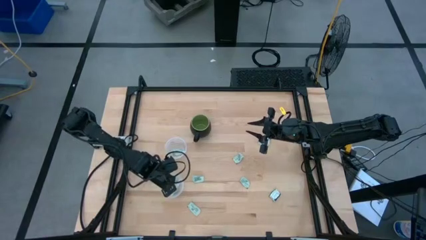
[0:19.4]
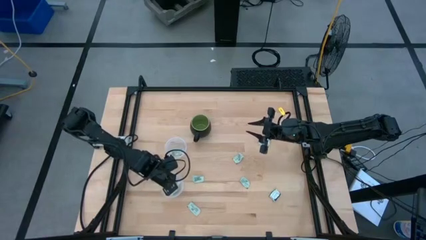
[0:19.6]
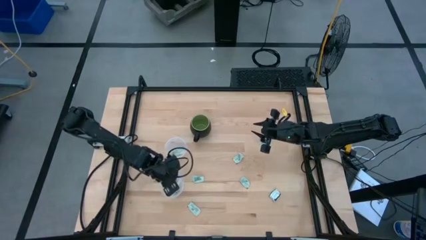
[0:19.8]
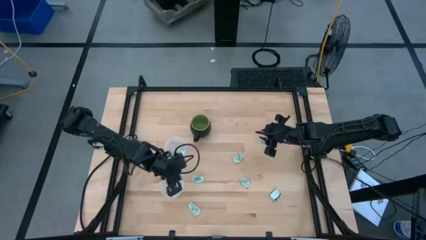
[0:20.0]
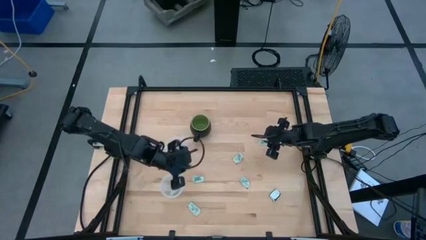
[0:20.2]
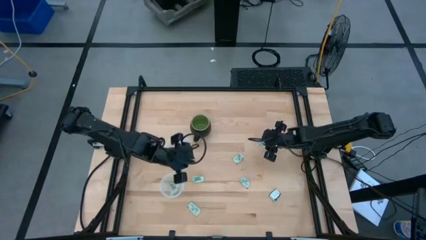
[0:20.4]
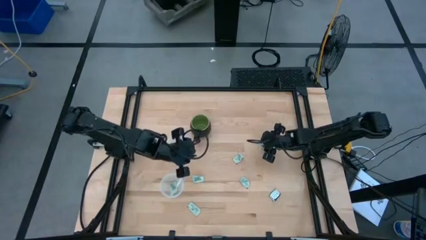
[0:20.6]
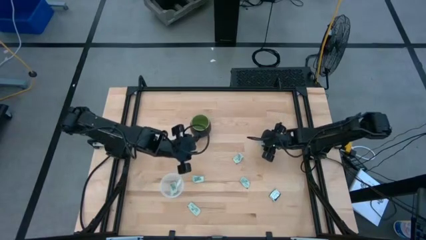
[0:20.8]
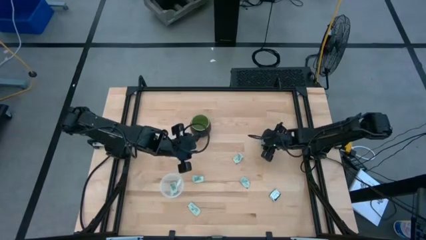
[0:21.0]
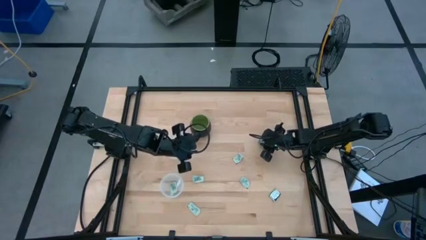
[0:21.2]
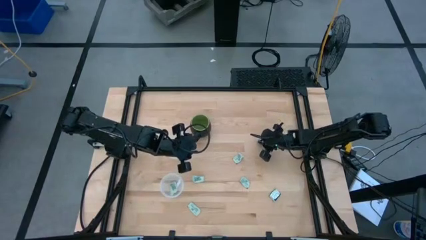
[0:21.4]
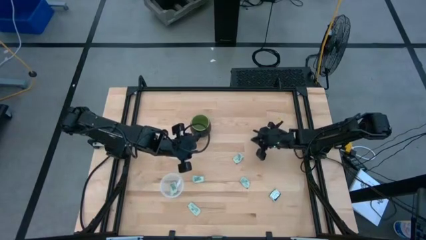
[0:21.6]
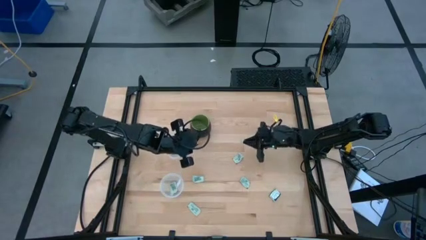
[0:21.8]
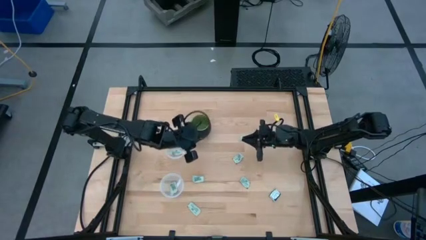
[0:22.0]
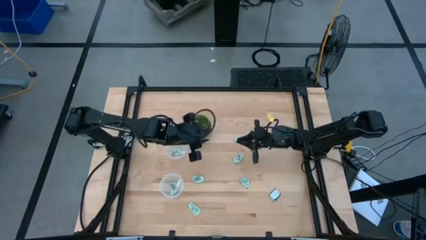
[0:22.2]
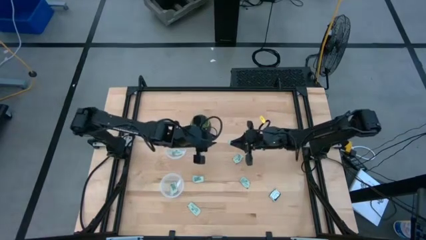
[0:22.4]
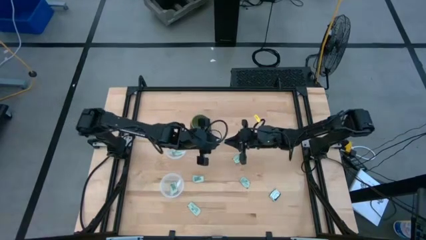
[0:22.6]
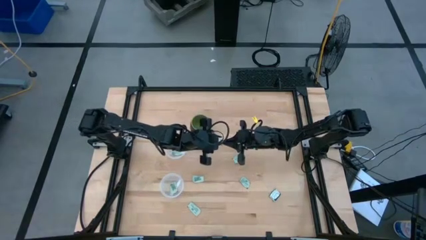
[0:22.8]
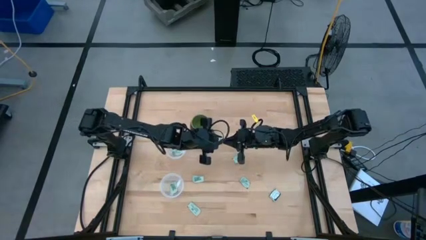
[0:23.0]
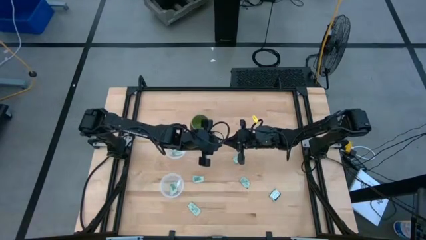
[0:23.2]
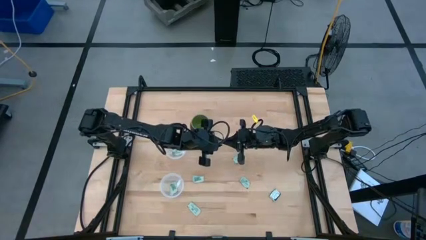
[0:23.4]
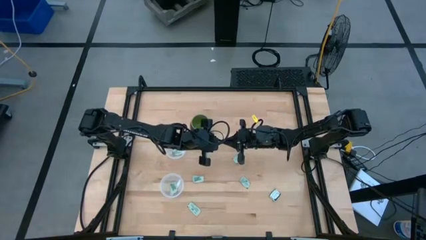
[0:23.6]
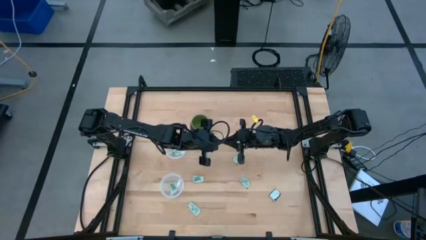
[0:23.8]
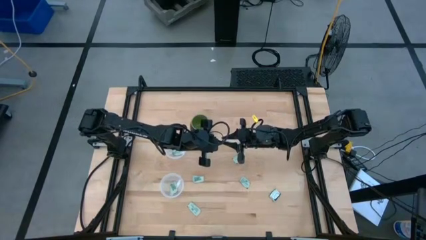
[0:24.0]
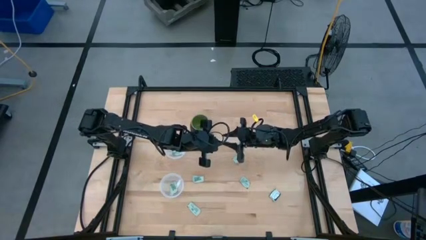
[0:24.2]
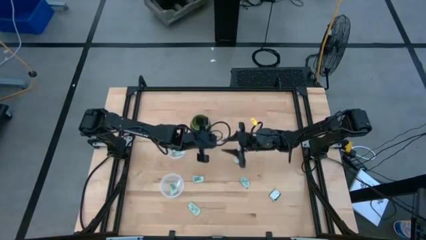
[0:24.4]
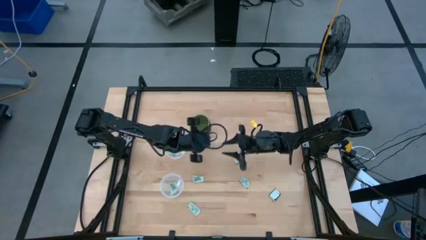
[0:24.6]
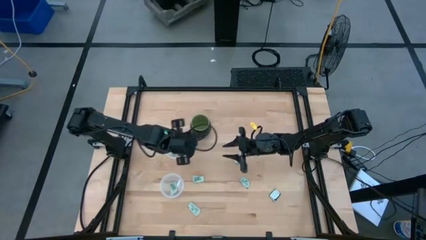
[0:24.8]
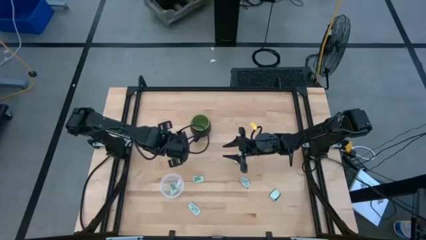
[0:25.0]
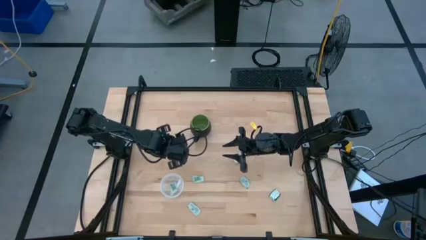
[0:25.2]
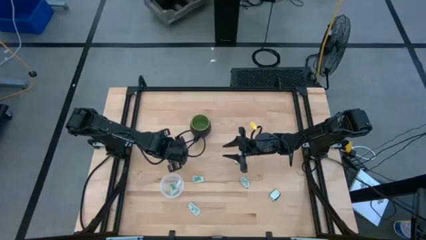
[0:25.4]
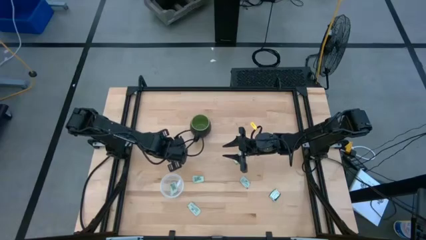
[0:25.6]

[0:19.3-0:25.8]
Task: Pick and place Stevia / Truvia into bins
Put the green stevia packet into the top transparent container

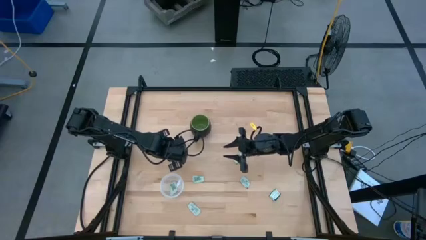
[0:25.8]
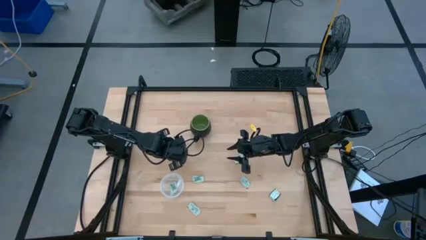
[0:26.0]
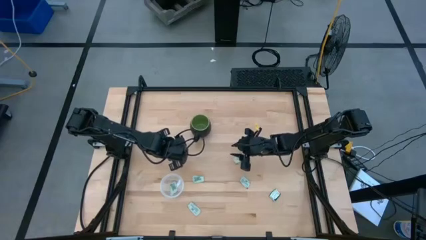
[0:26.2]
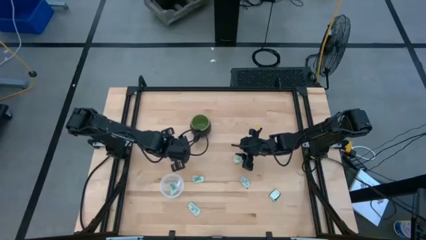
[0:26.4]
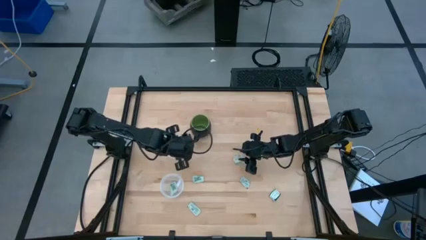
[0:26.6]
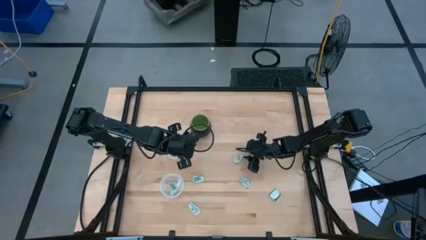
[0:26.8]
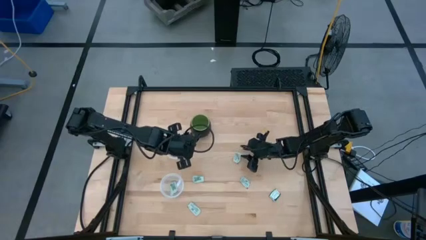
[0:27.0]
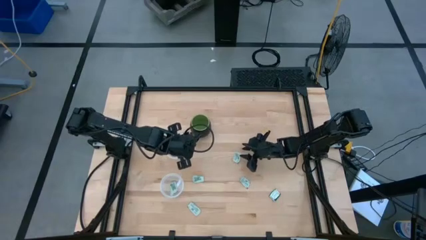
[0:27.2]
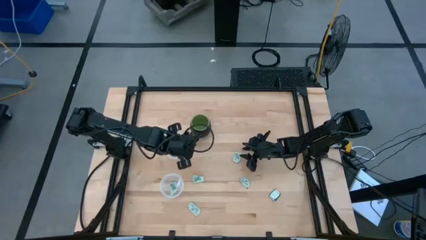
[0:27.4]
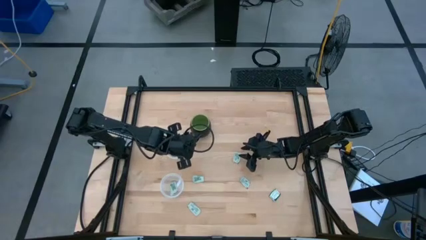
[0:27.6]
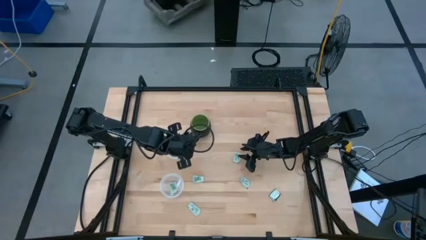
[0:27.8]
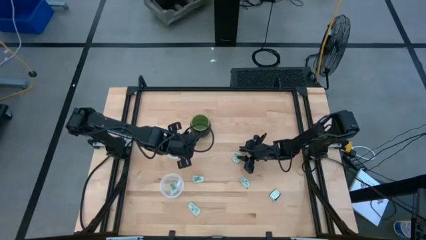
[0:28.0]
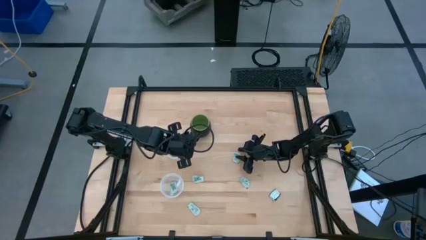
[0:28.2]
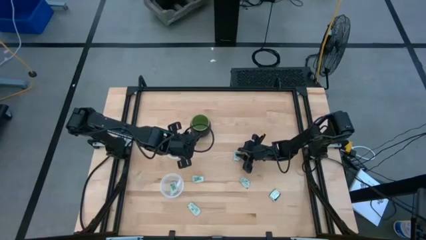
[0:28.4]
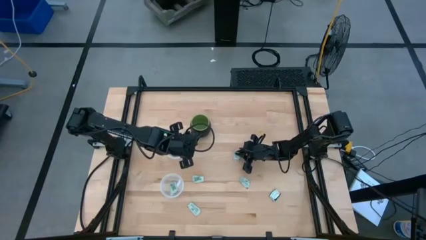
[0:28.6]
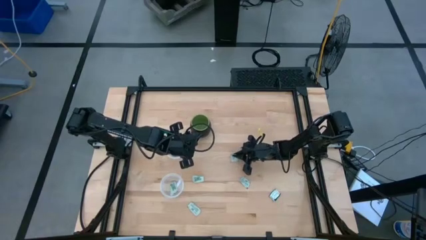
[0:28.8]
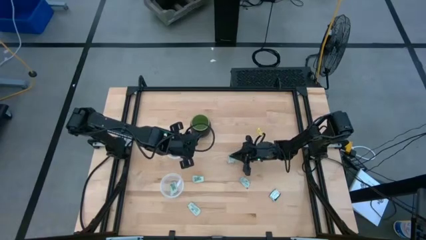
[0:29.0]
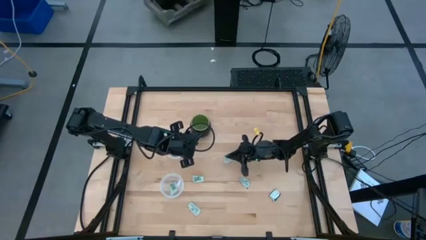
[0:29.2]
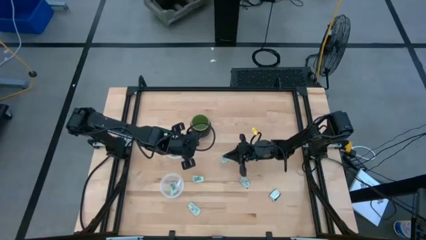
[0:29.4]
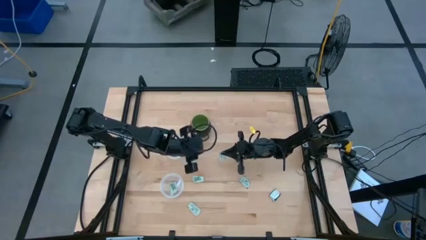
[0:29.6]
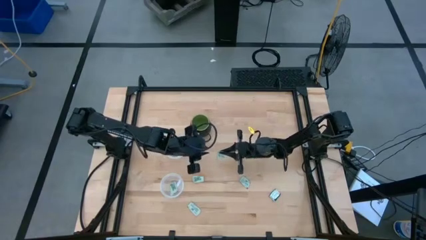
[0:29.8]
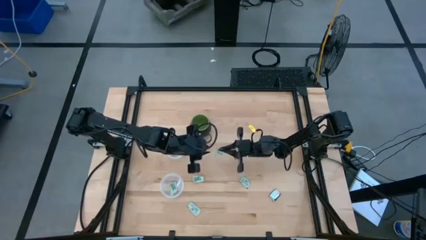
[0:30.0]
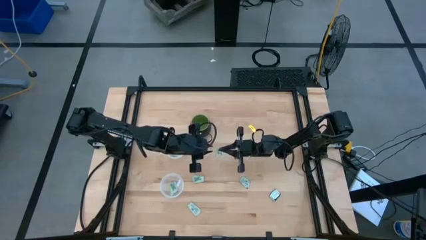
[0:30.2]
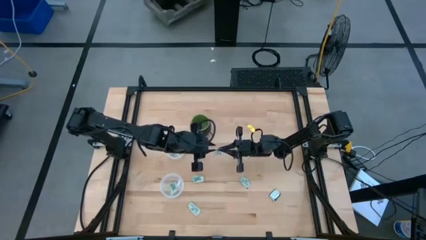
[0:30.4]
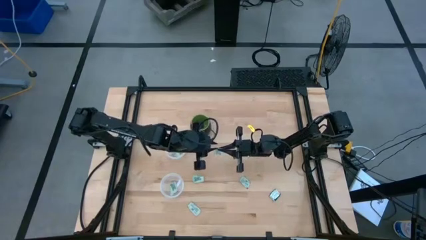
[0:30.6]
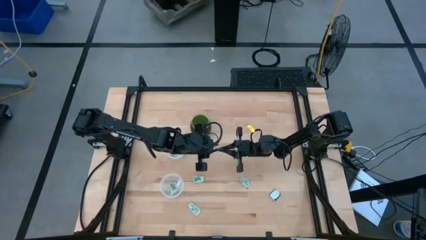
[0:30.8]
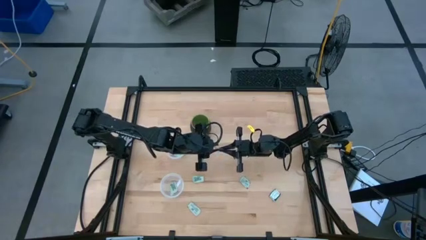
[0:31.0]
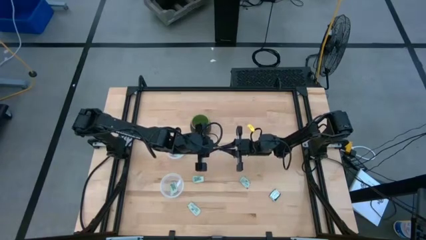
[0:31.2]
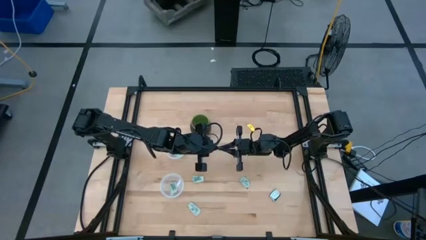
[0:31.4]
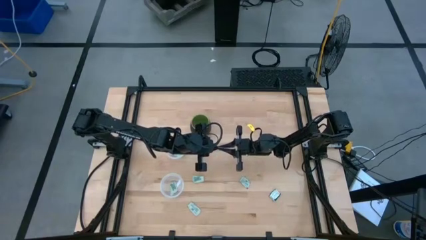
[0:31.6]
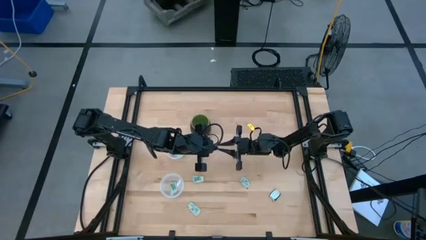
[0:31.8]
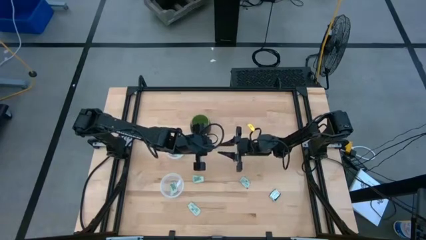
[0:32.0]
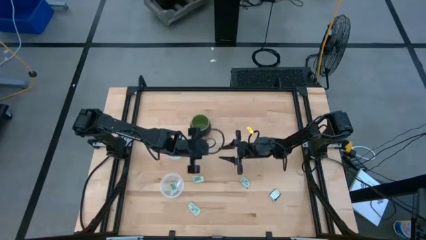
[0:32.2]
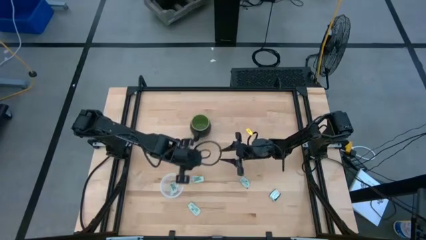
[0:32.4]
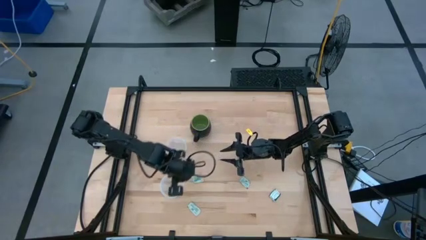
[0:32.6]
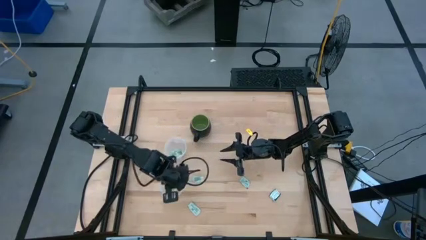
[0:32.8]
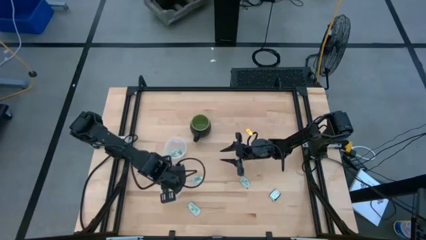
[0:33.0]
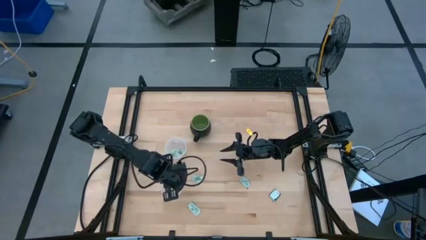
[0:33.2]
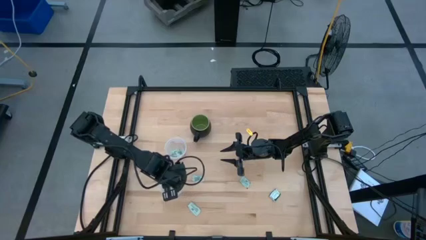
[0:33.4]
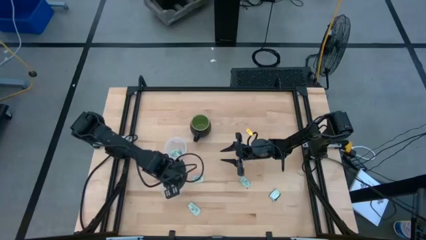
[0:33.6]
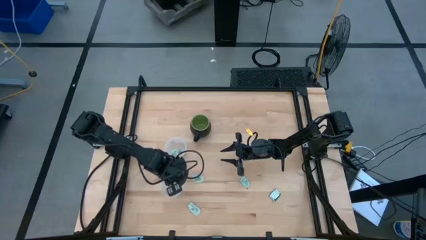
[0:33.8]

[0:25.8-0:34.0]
Put the green stevia packet into the bottom transparent container

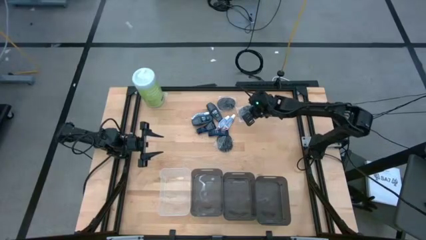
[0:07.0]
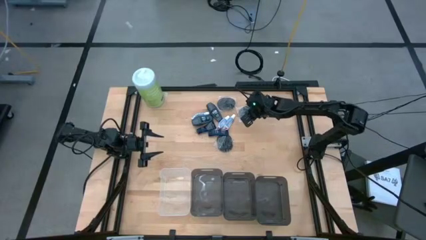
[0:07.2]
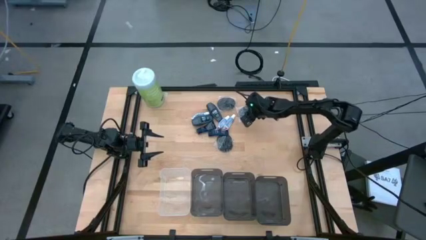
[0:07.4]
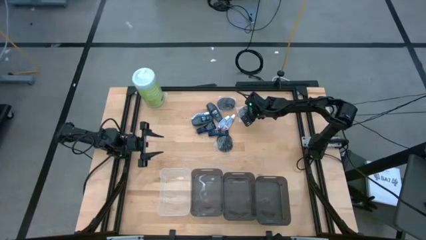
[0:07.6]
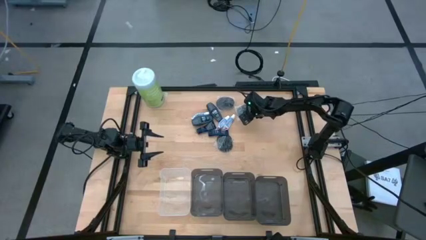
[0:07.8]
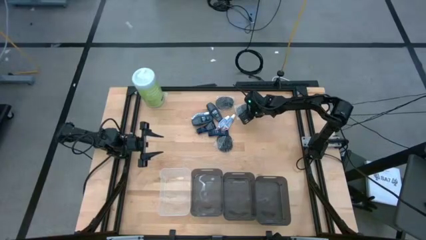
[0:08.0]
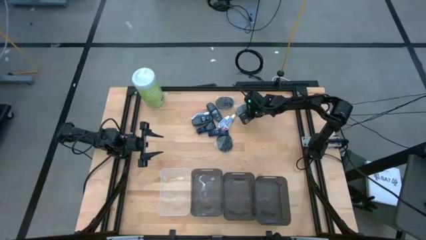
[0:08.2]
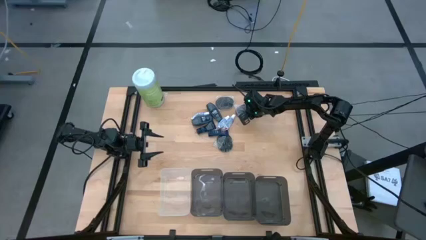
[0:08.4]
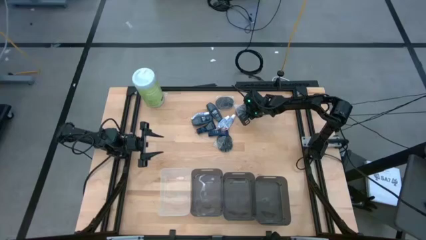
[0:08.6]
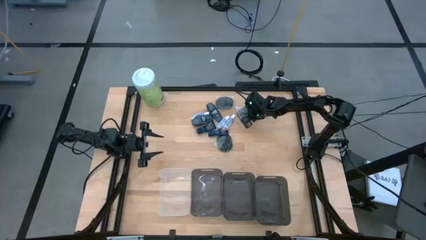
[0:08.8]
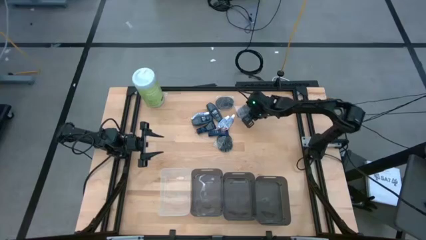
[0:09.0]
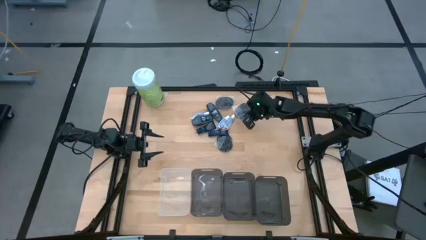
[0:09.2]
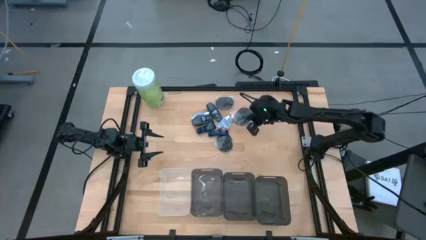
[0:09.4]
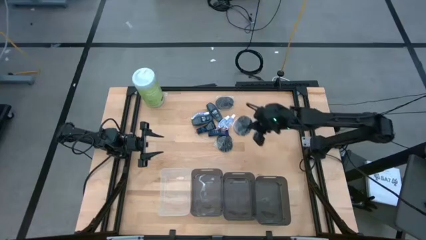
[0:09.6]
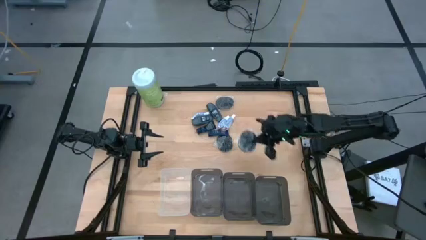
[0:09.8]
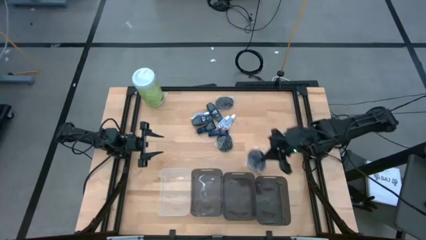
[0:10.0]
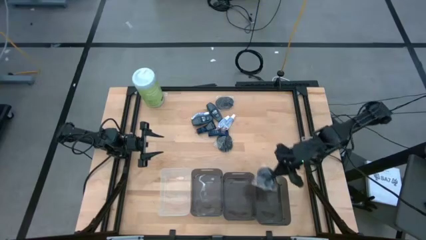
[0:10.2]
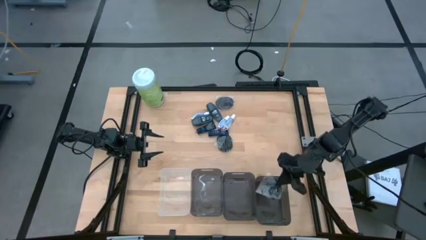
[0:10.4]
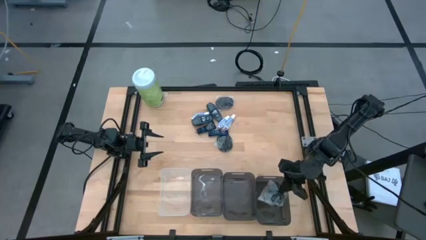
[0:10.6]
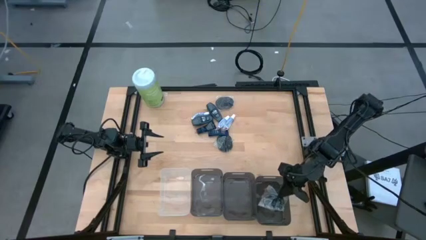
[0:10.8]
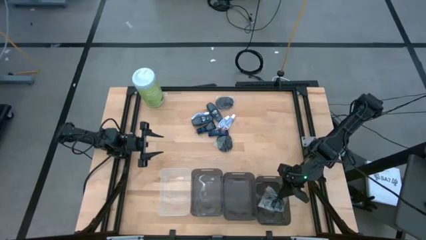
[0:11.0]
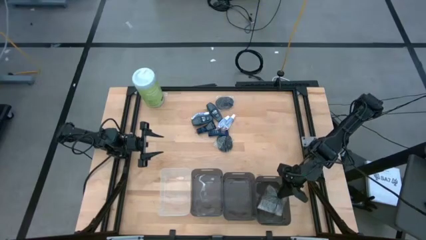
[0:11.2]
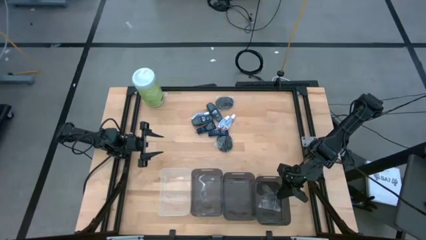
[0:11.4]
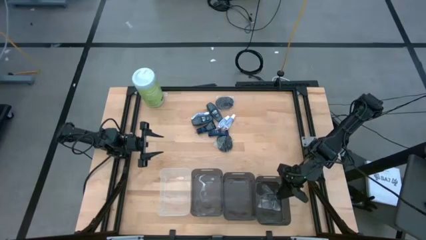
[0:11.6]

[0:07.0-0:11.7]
Task: Pick & Place Travel size toiletries
Put the top right black hairbrush into the right black bin
